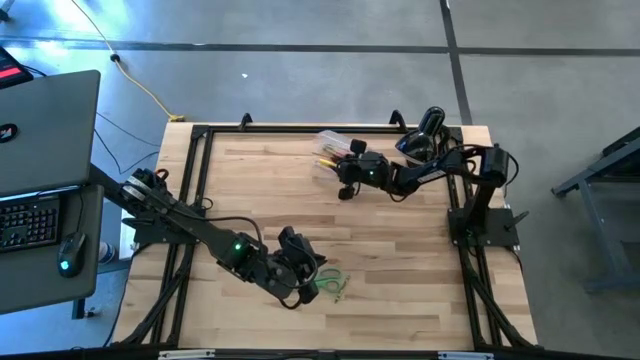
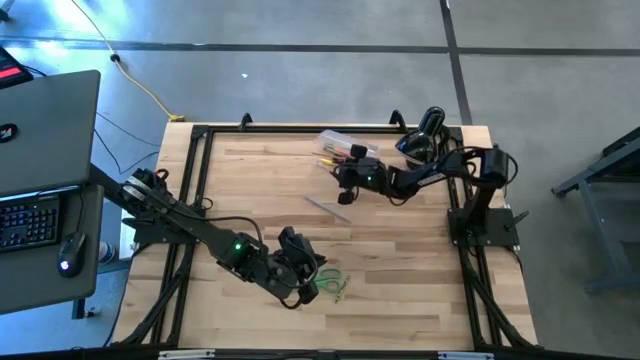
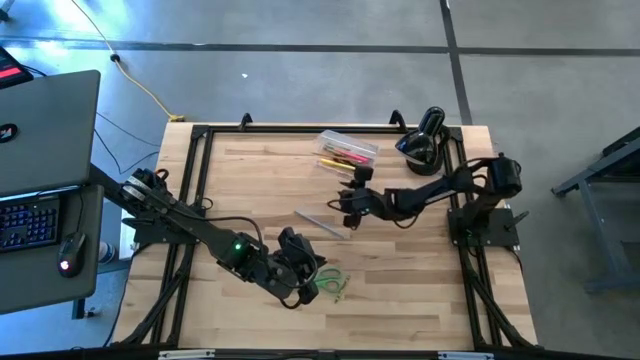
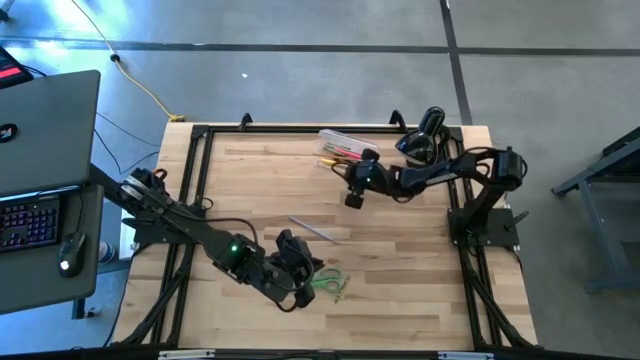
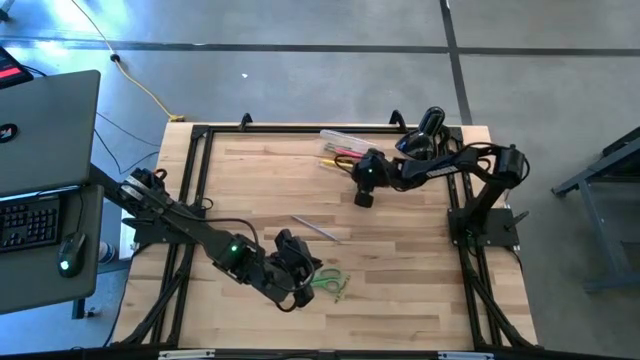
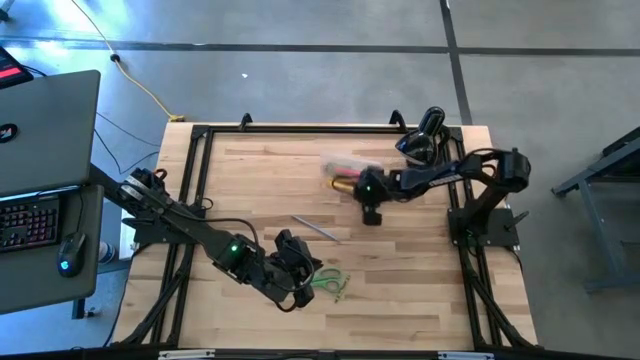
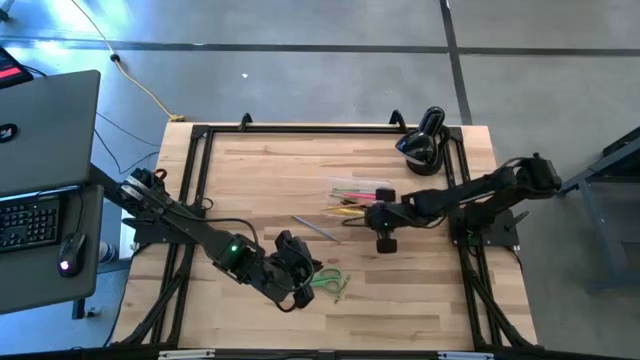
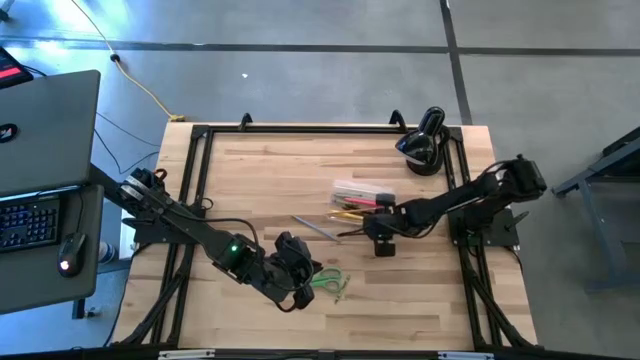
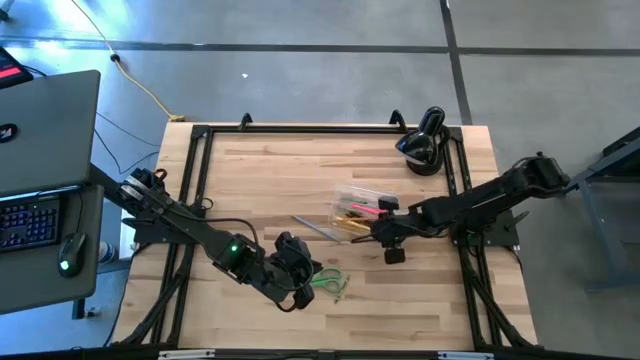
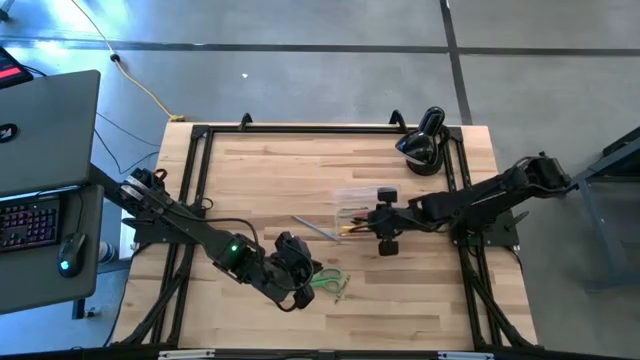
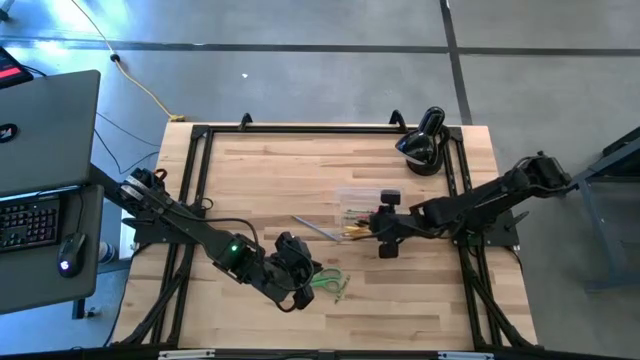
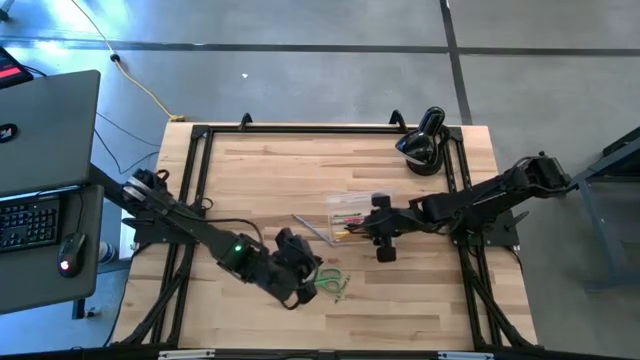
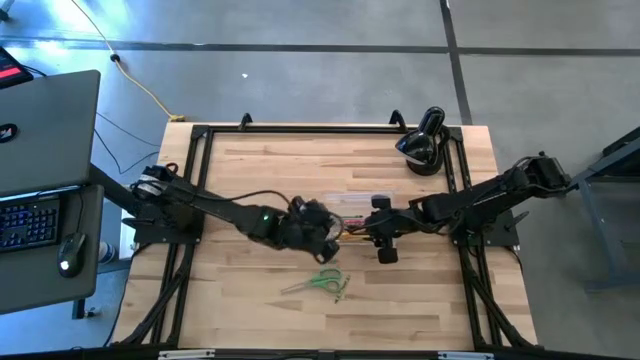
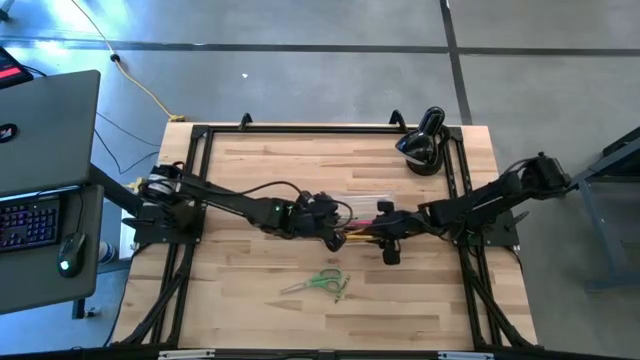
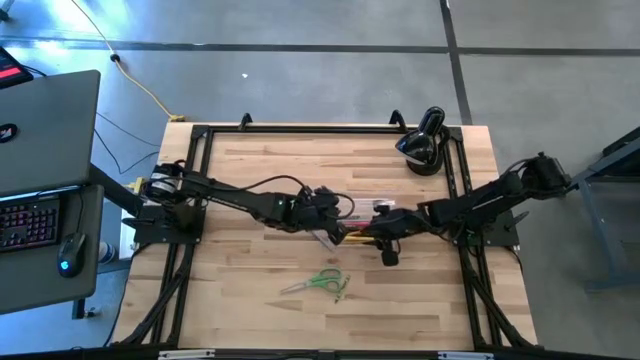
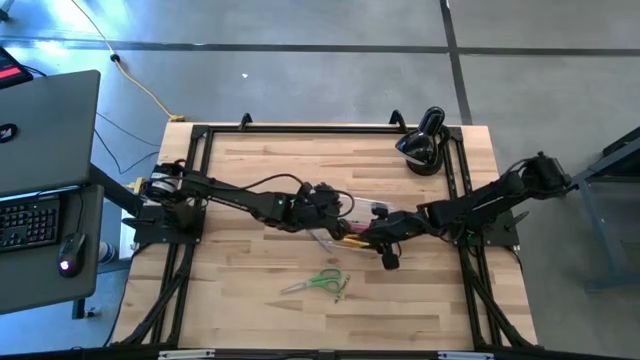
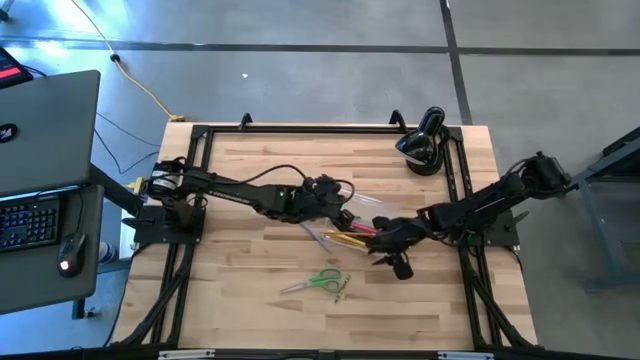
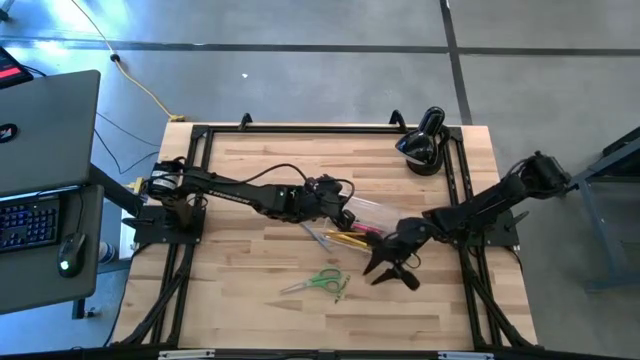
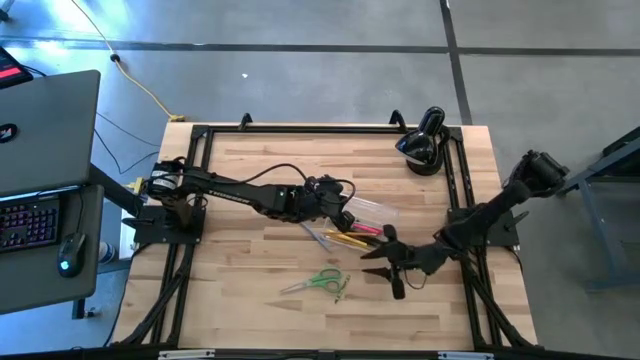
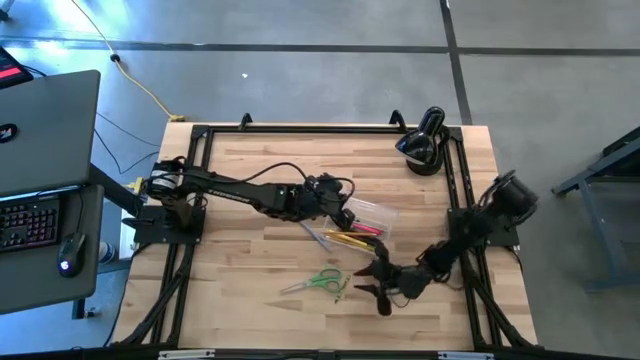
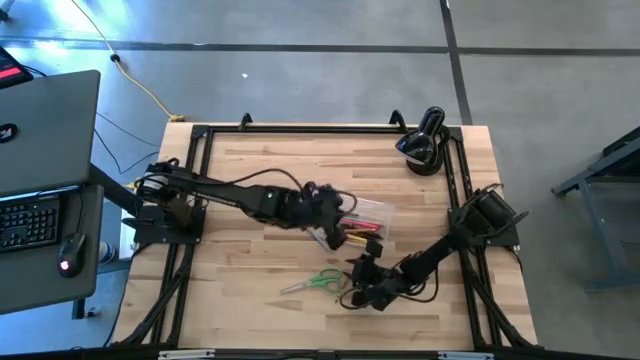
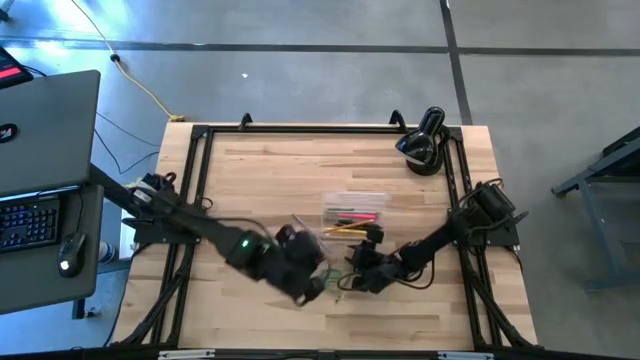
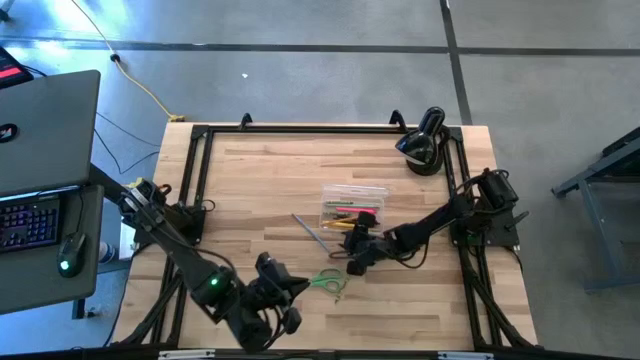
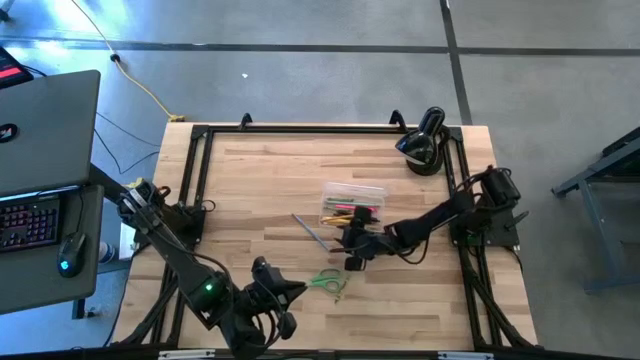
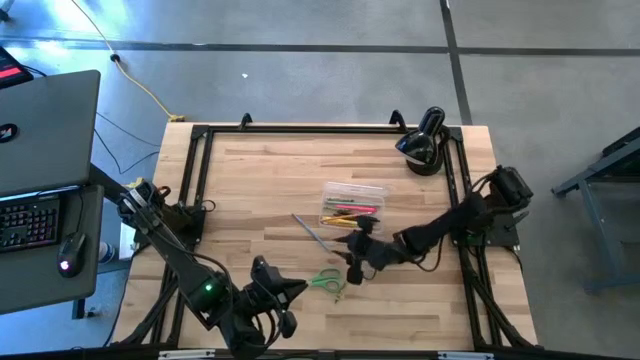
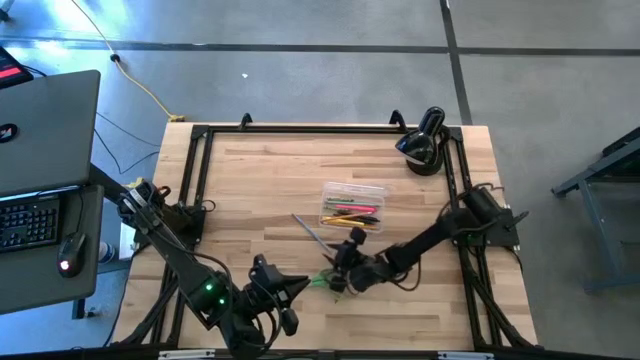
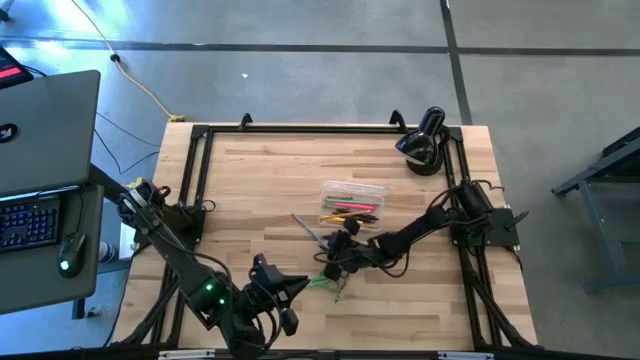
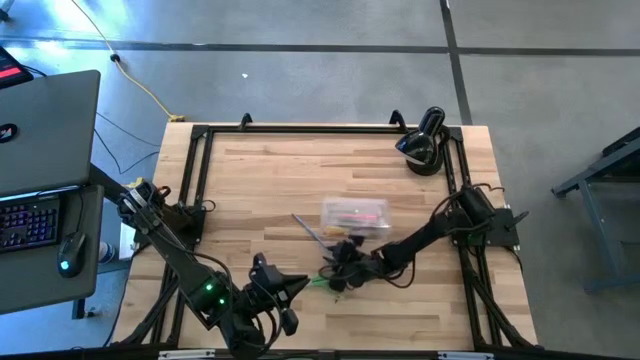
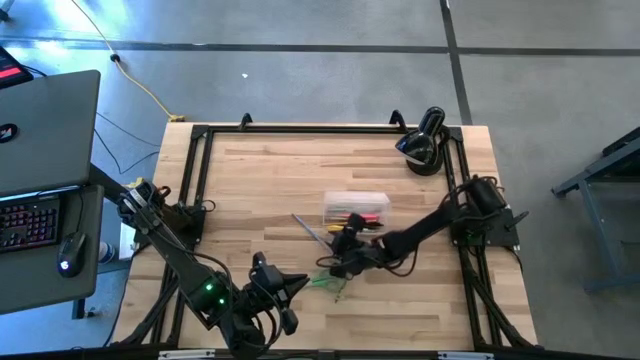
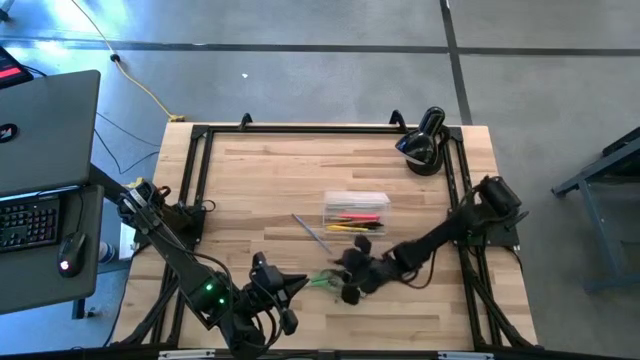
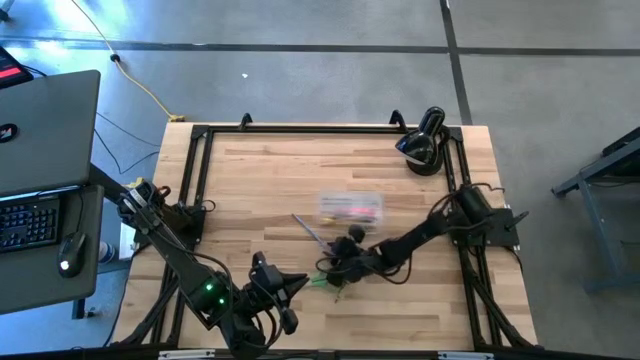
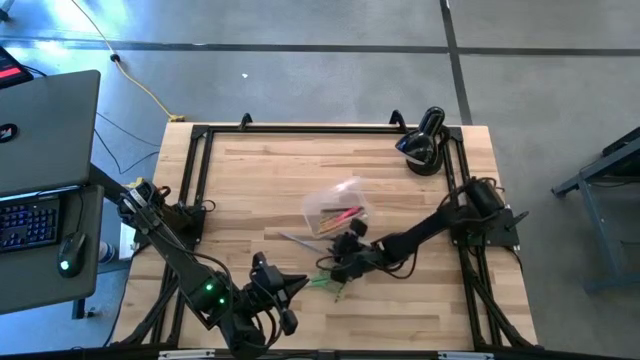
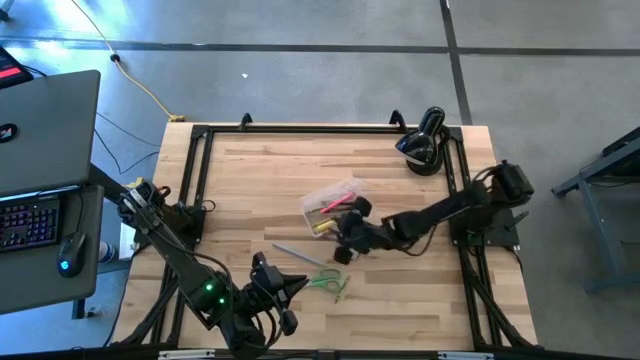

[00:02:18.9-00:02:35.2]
Task: Pick & place school supplies into a supply box
Adjust the supply box

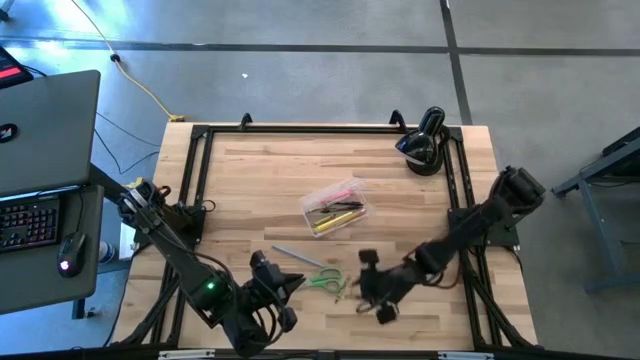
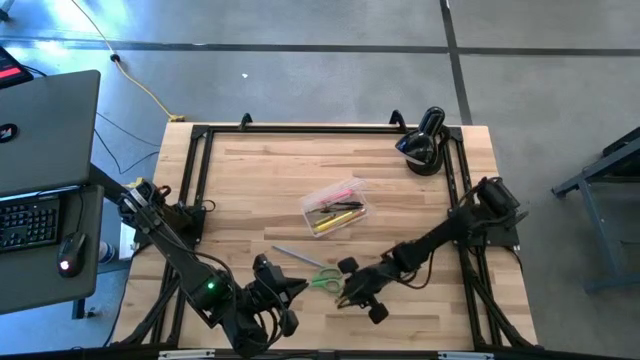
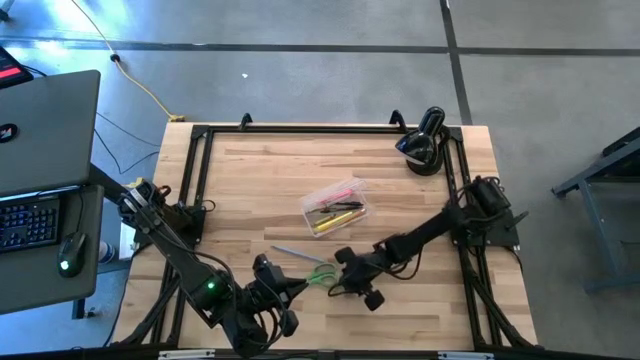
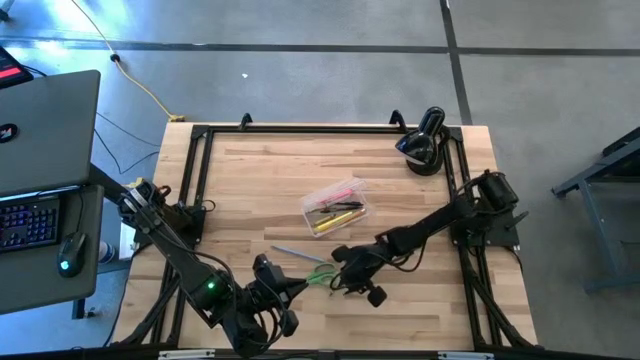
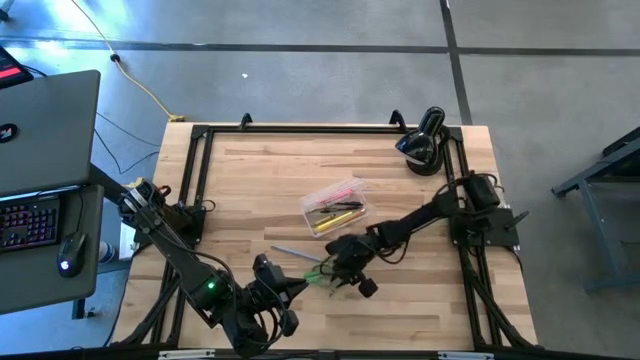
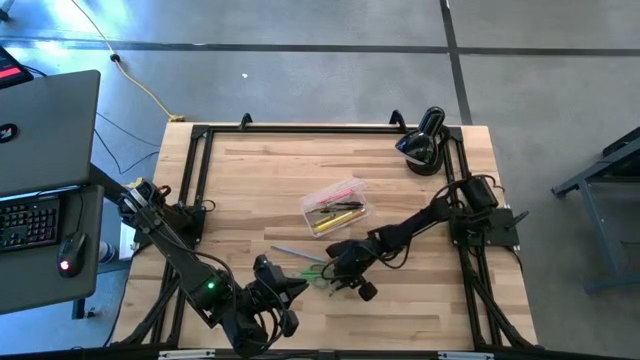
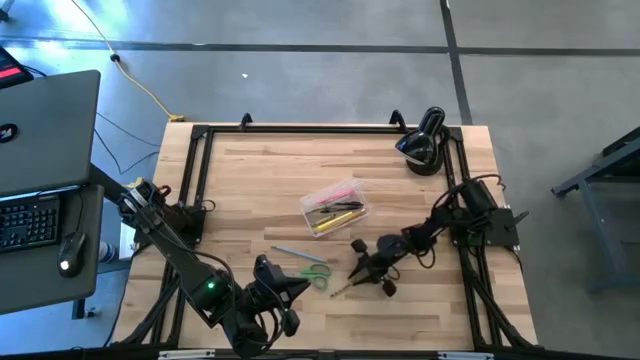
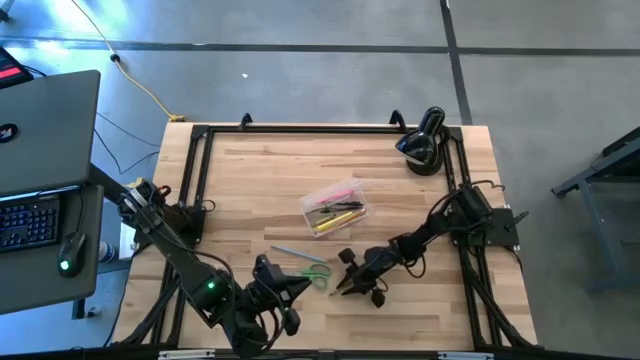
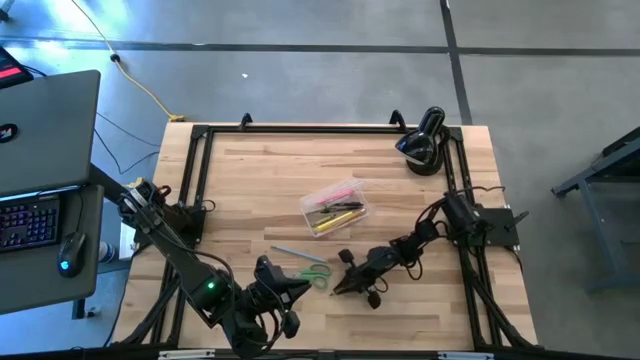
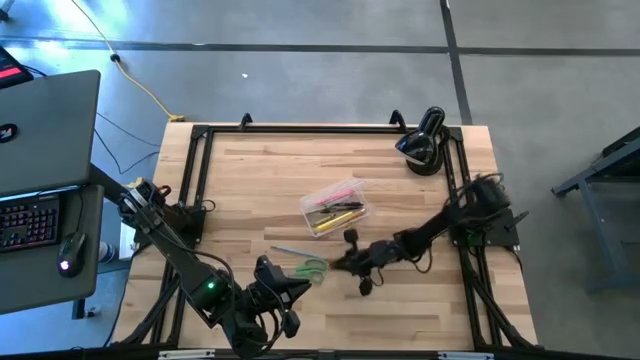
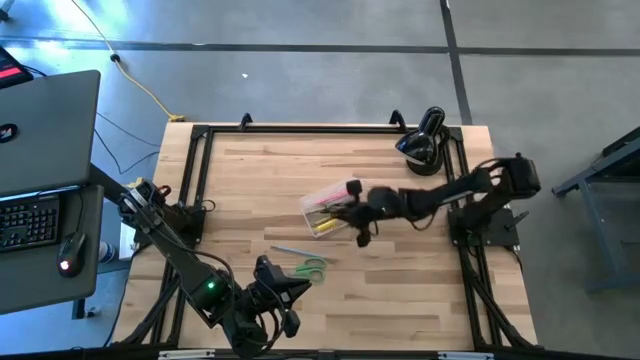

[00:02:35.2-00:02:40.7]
Put the green crayon into the supply box
